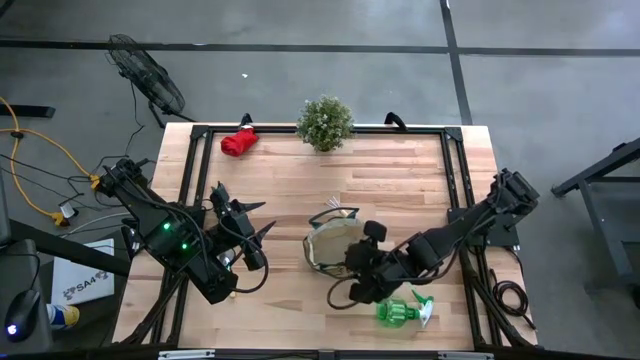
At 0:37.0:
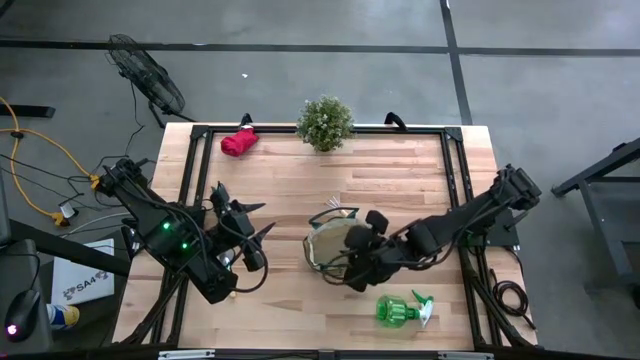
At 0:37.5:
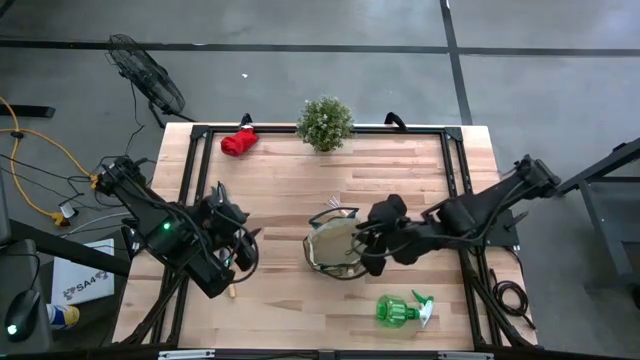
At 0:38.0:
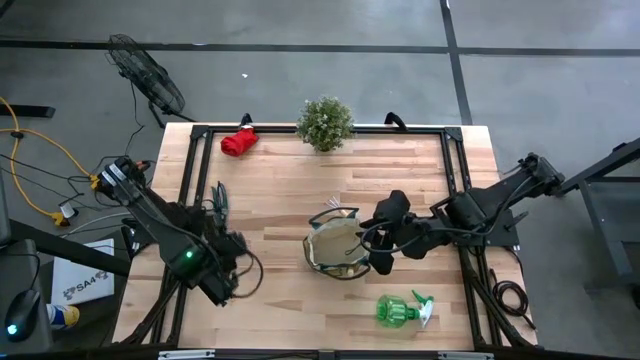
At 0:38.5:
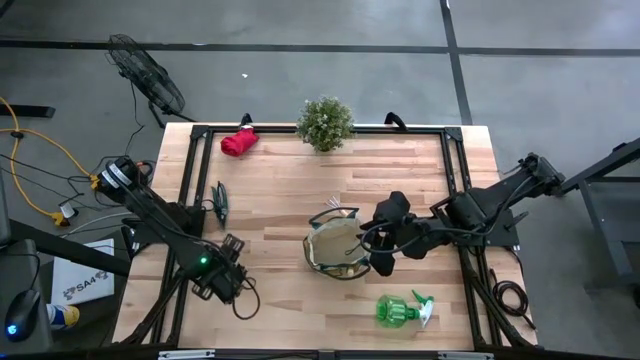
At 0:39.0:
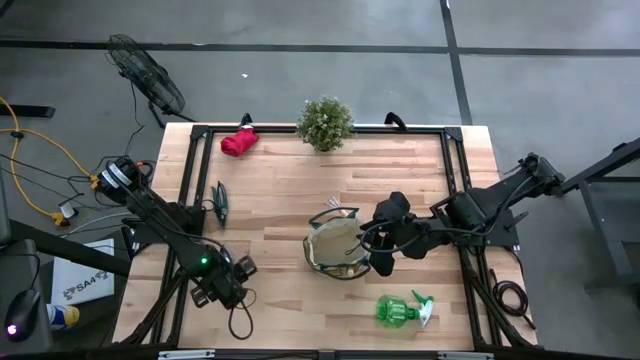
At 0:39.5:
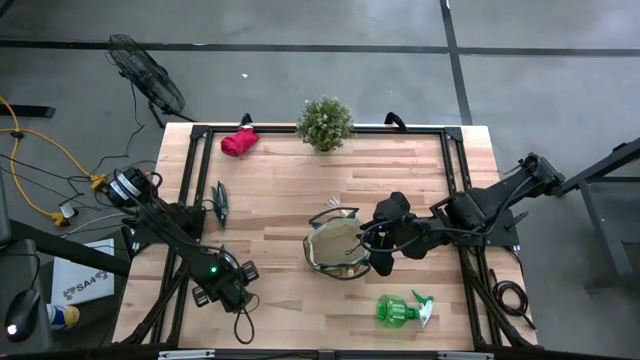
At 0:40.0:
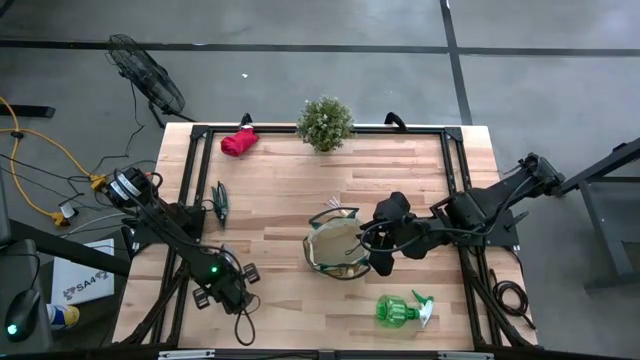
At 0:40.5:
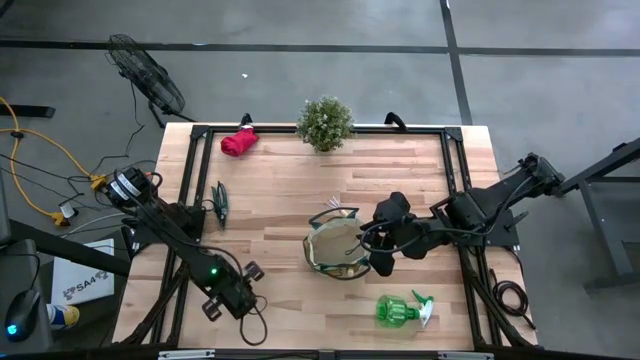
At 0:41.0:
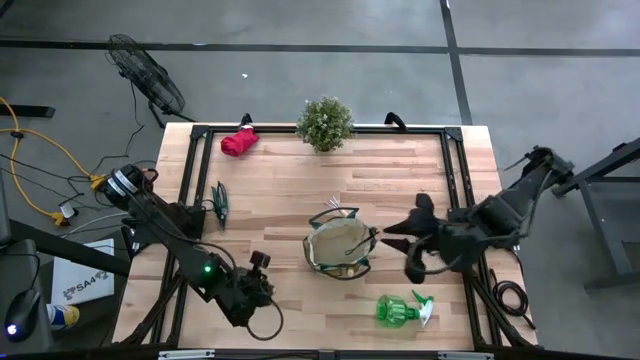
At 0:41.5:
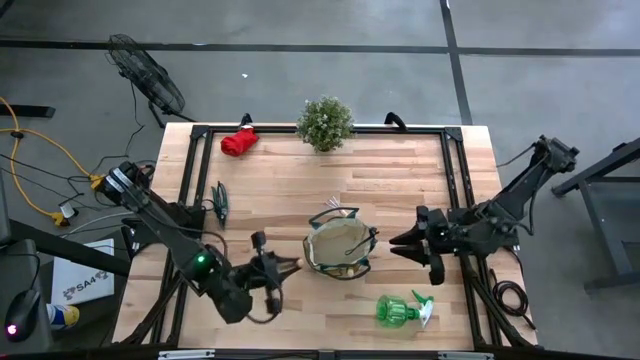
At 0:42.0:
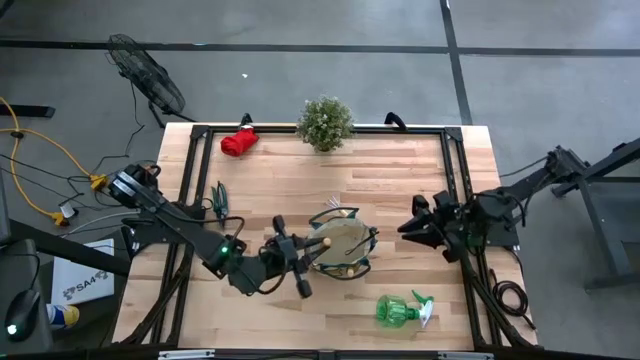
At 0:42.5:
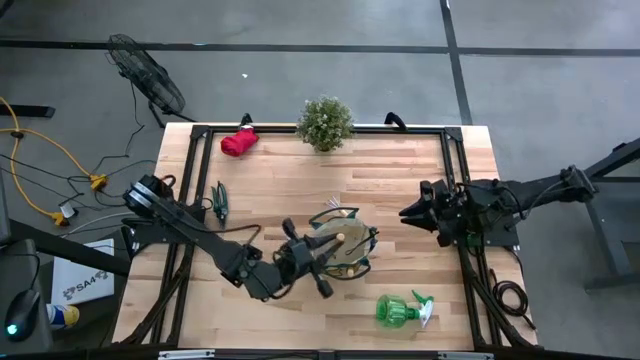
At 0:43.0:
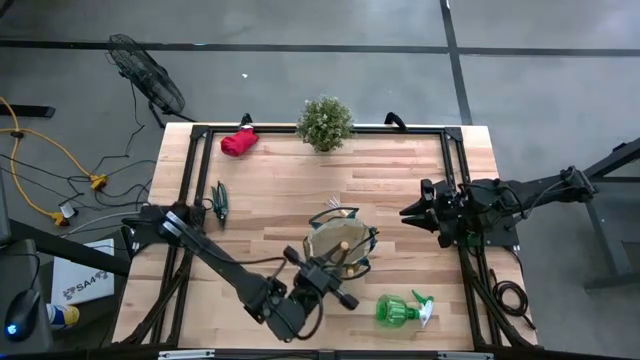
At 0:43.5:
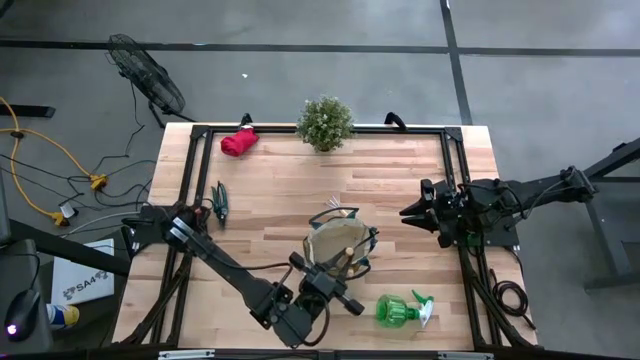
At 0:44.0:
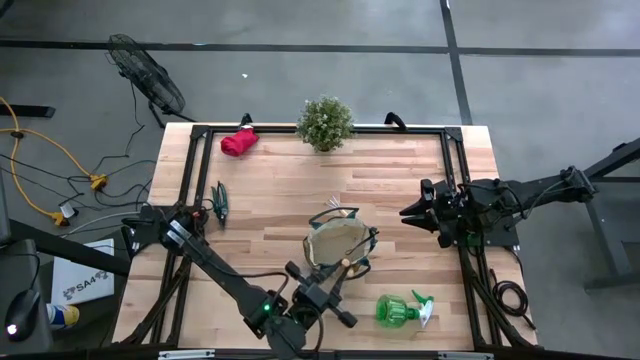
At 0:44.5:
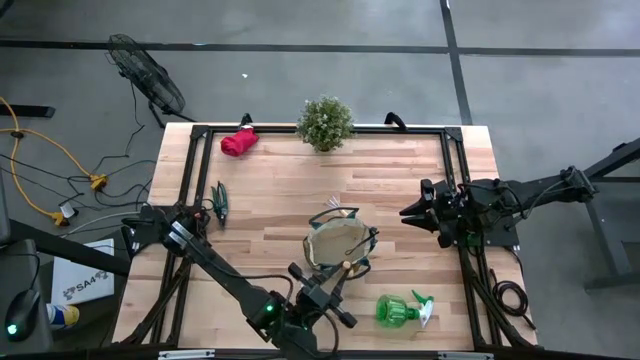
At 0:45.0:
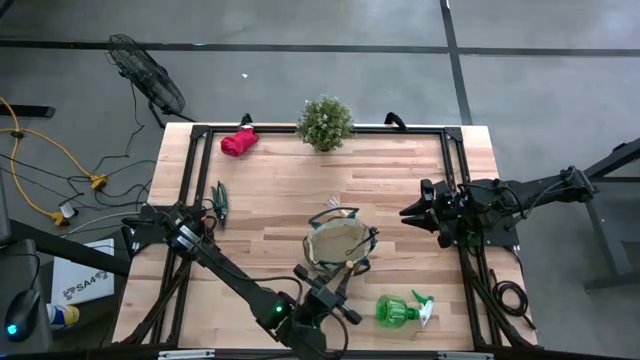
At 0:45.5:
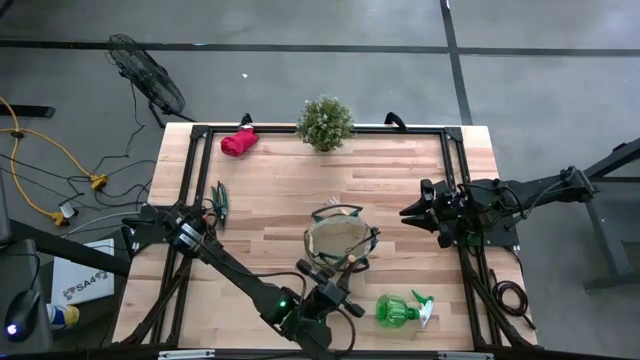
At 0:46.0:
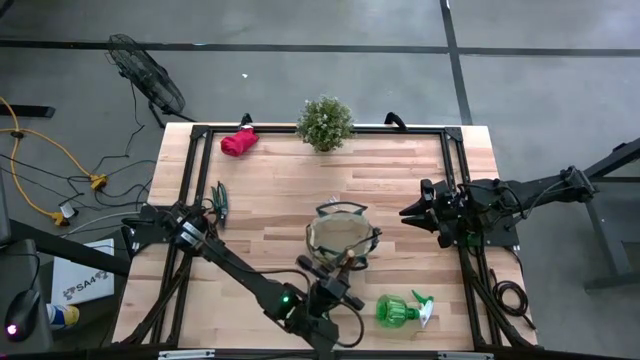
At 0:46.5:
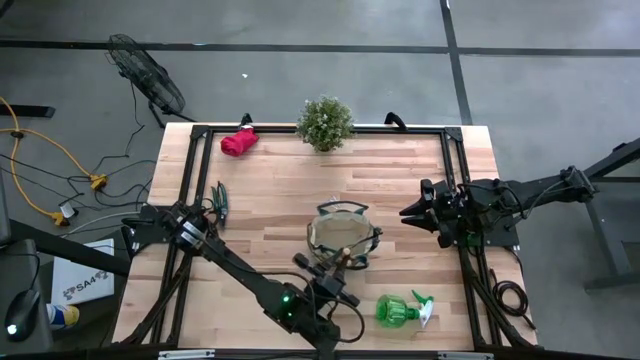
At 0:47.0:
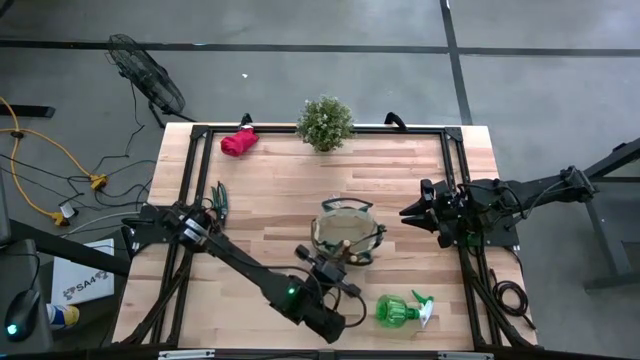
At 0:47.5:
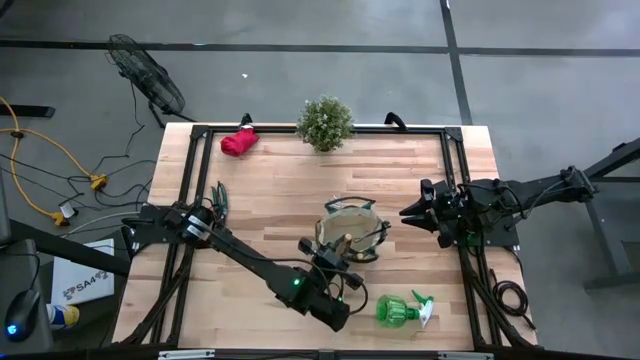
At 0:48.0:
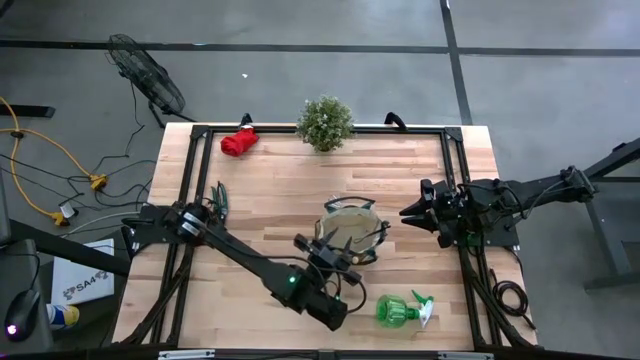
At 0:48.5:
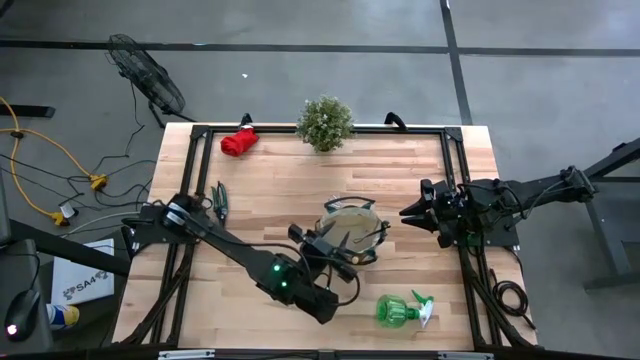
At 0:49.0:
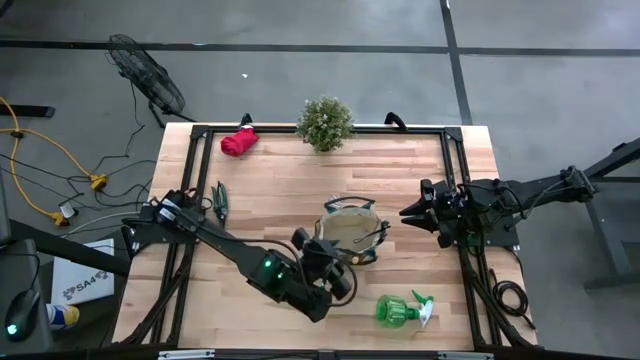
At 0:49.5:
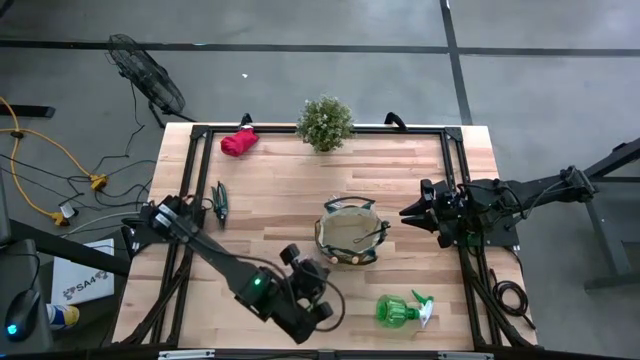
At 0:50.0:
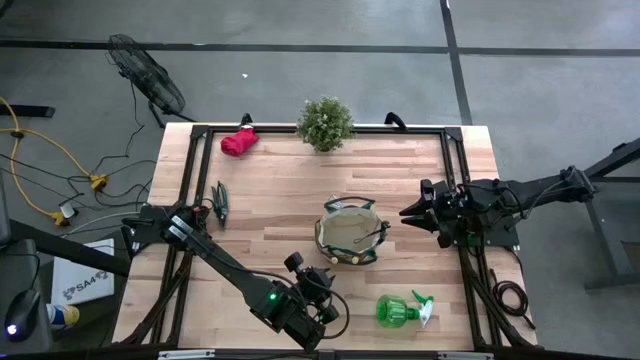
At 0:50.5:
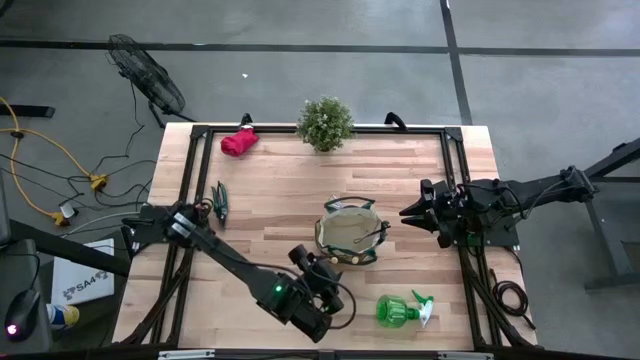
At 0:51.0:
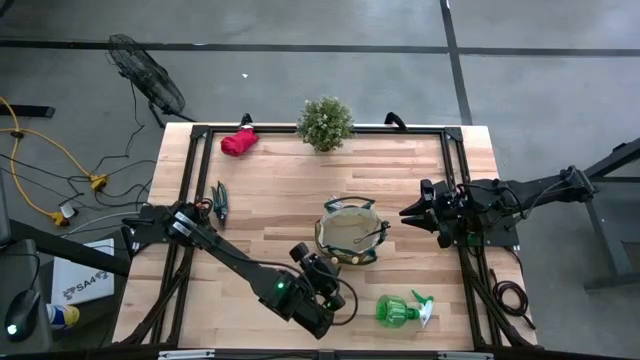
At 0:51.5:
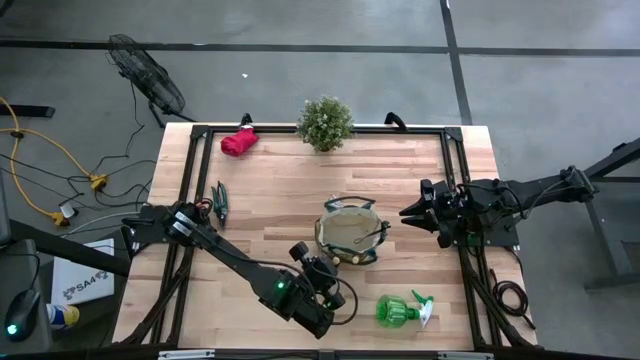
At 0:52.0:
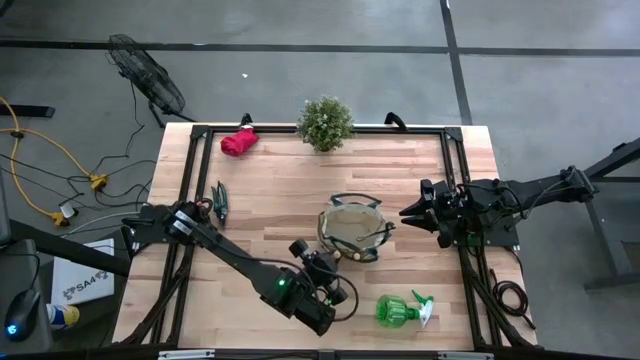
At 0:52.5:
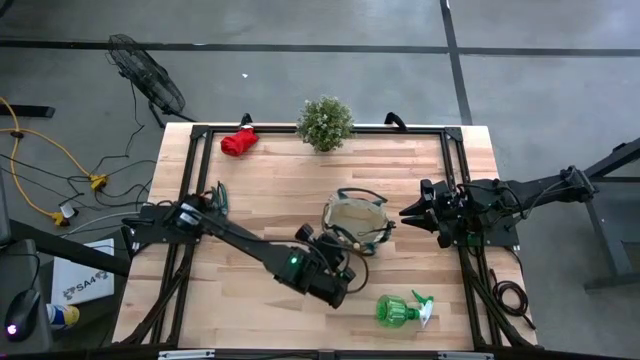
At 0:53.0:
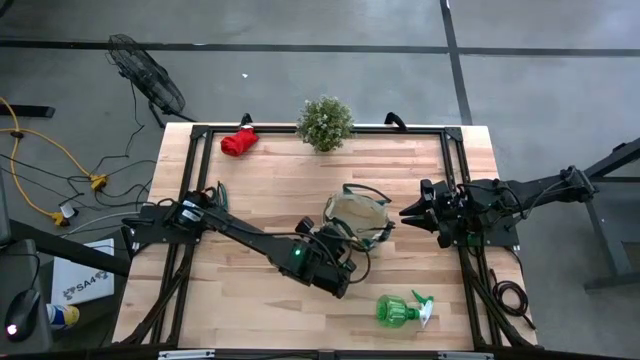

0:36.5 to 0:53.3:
Task: Pick & Place Garden tools in Gardening bag
Put the brown trowel into the brown gardening bag

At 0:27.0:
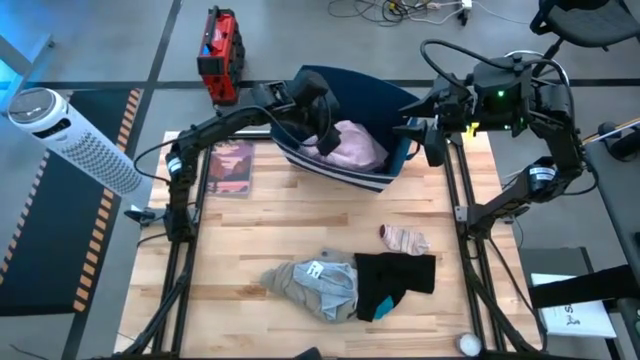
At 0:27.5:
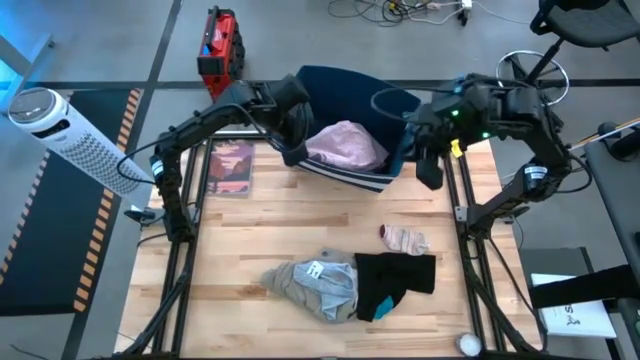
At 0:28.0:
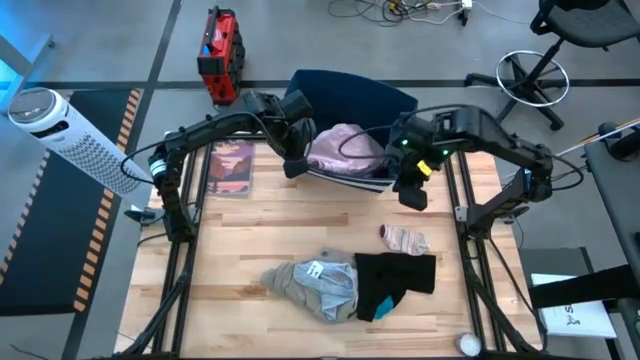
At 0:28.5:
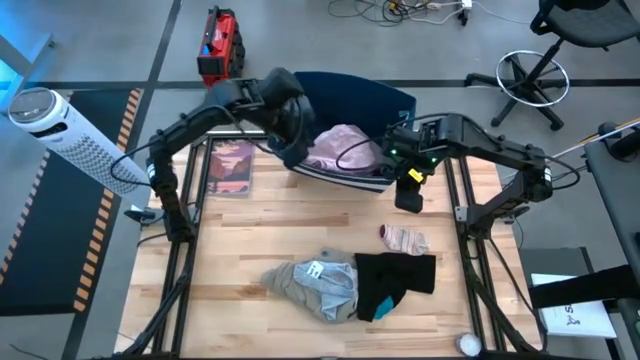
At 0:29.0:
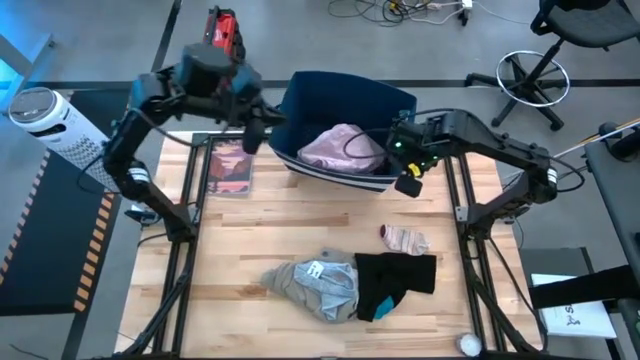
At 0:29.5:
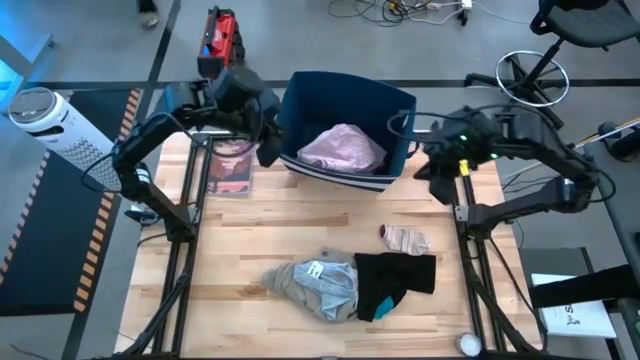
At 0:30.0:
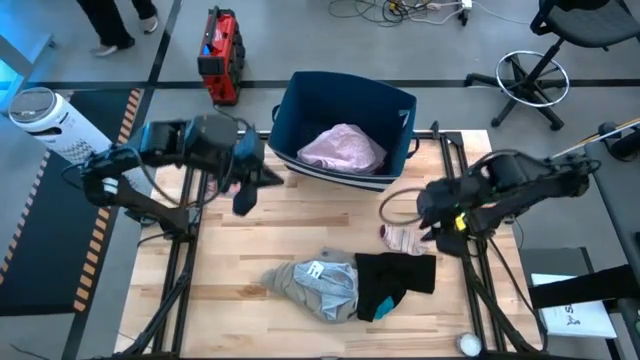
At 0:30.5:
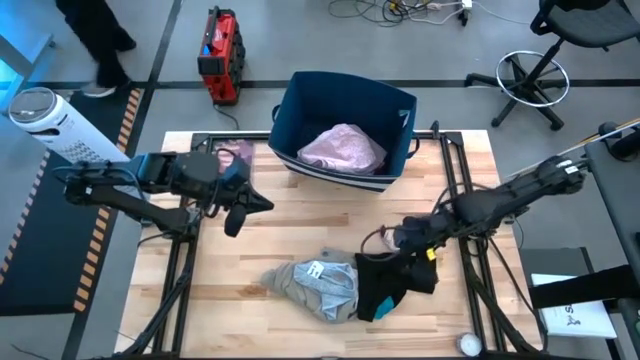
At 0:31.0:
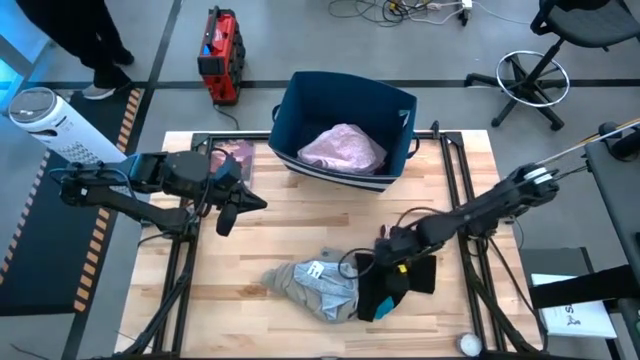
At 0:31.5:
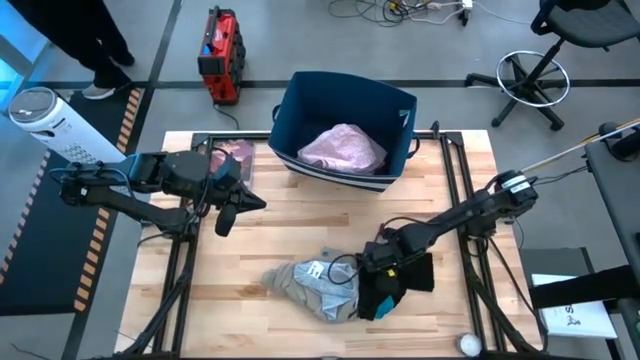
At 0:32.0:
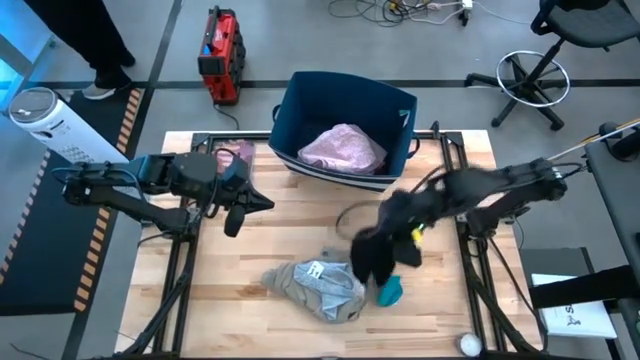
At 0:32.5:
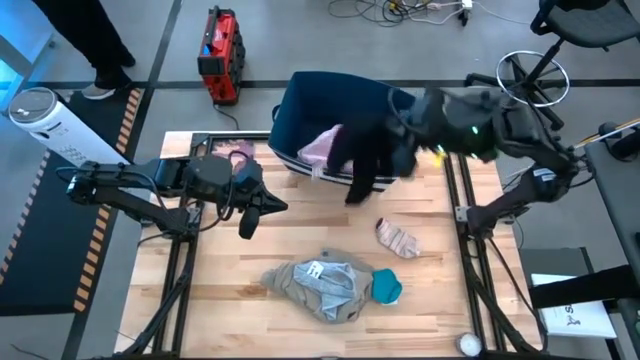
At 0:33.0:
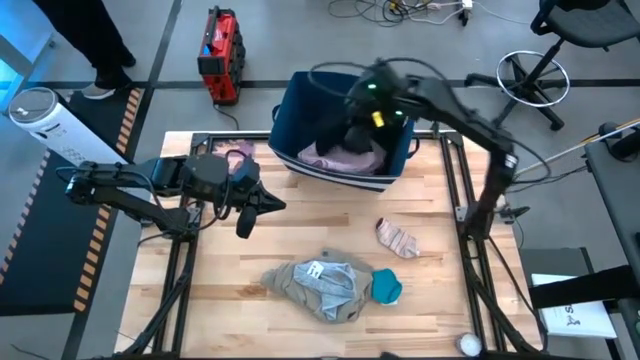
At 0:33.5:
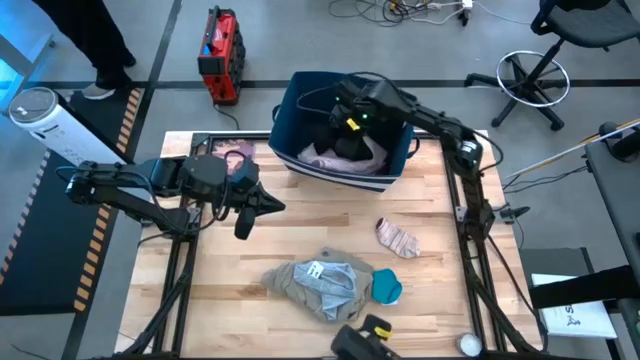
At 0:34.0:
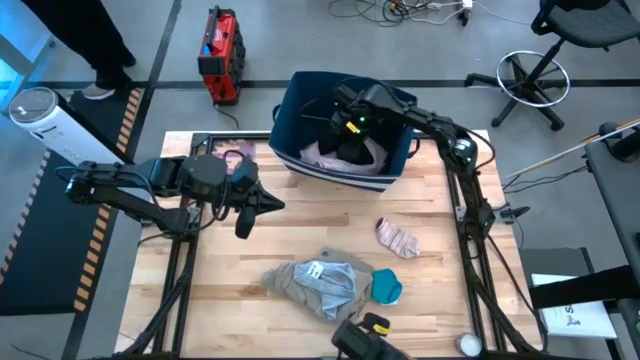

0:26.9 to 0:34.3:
Task: Sort clothes
Put the black underwear into the blue laundry bin
